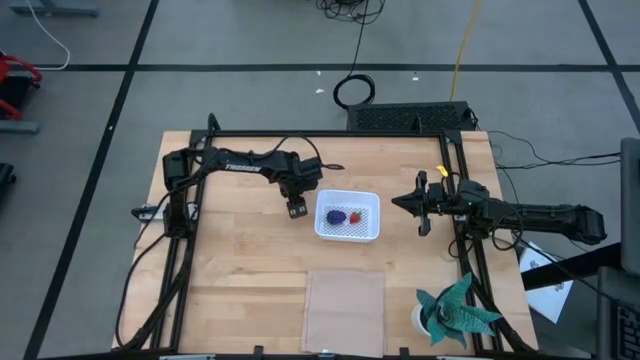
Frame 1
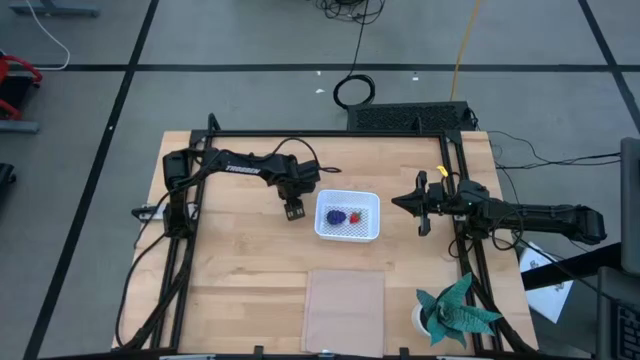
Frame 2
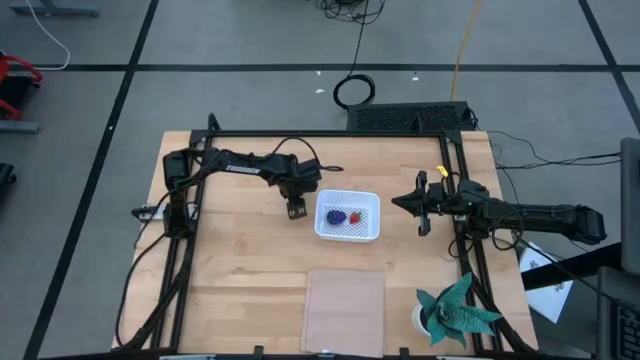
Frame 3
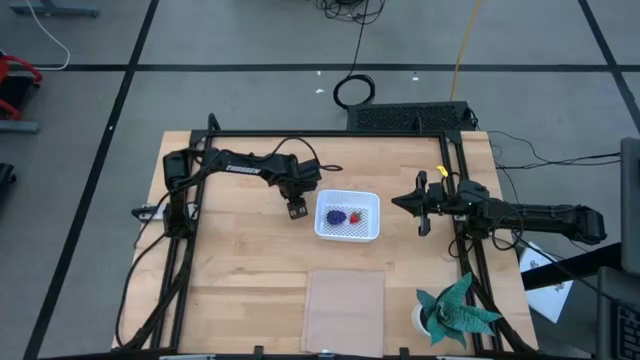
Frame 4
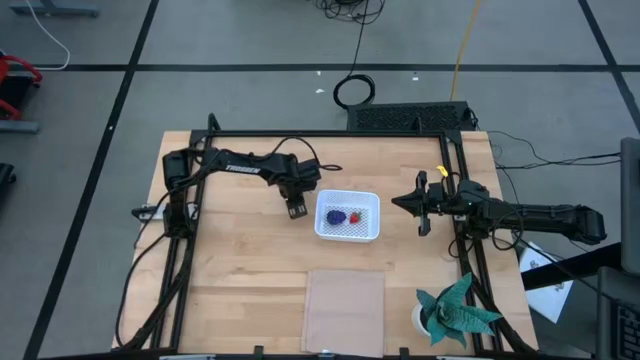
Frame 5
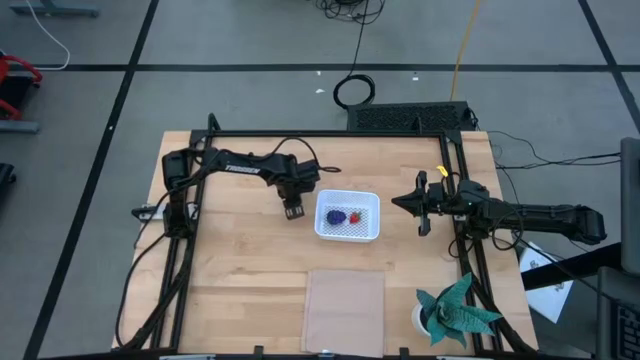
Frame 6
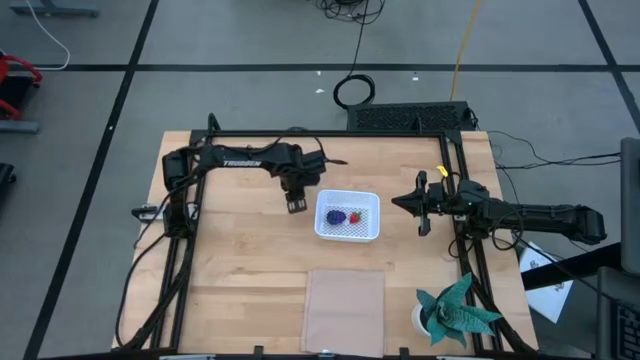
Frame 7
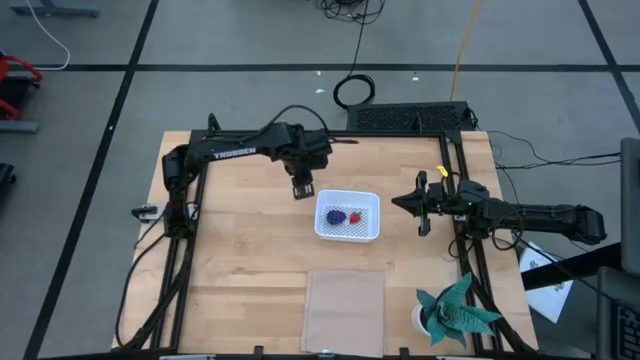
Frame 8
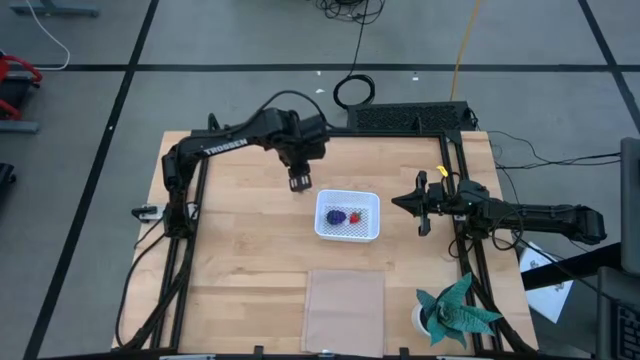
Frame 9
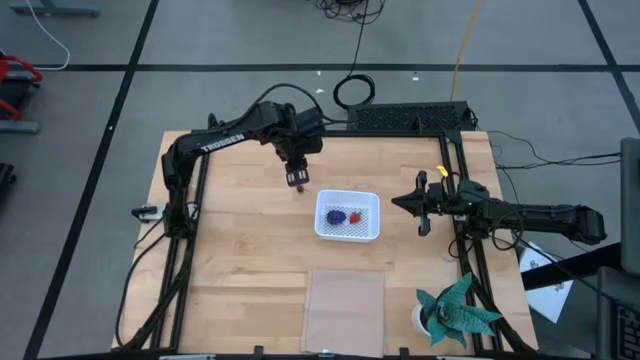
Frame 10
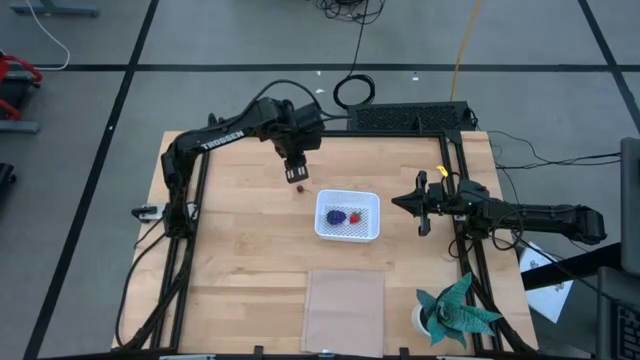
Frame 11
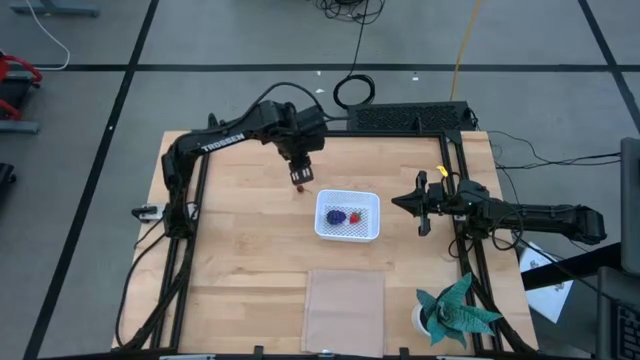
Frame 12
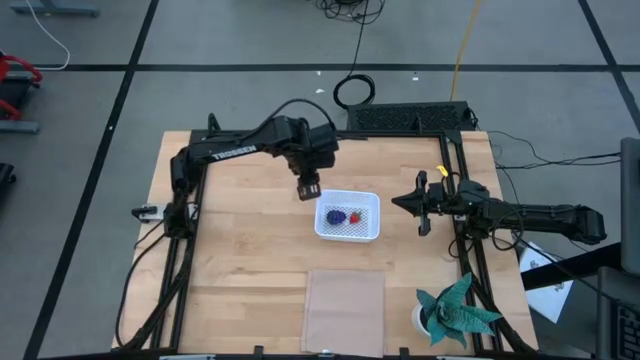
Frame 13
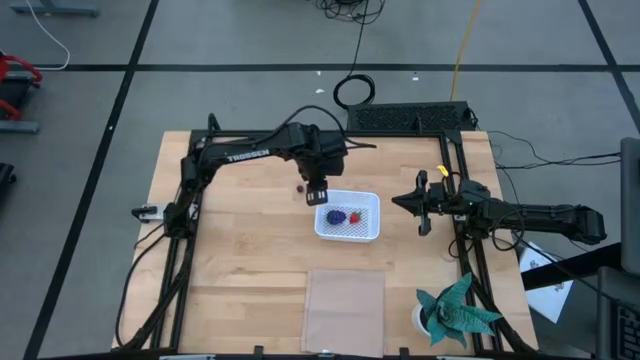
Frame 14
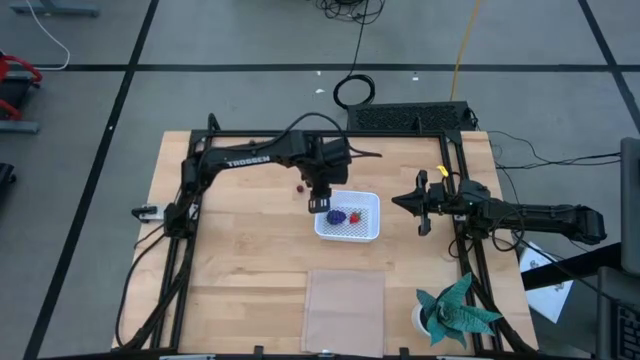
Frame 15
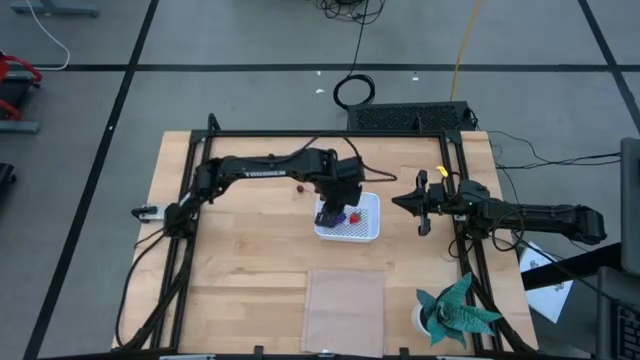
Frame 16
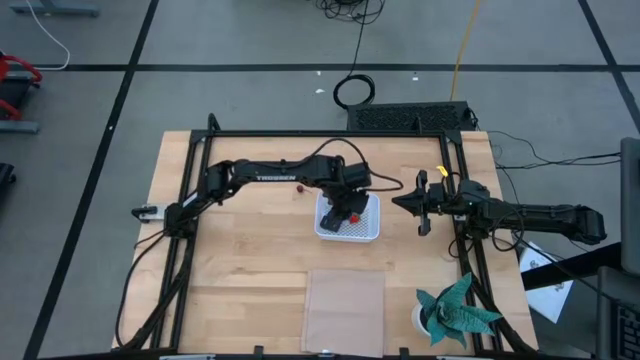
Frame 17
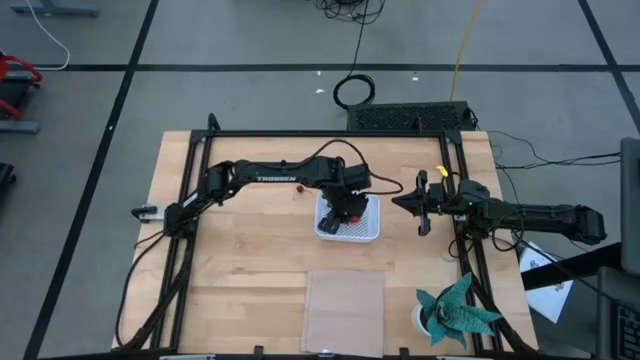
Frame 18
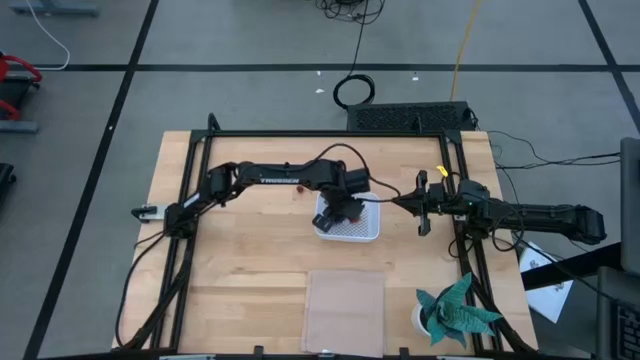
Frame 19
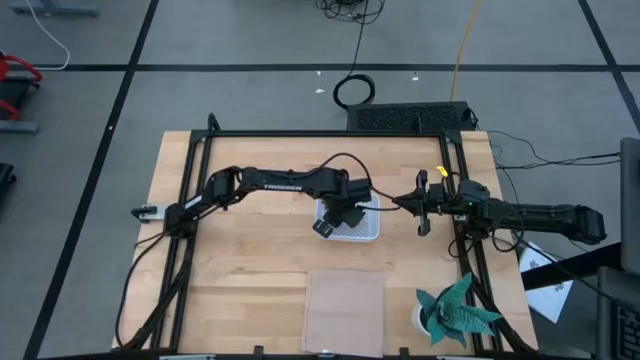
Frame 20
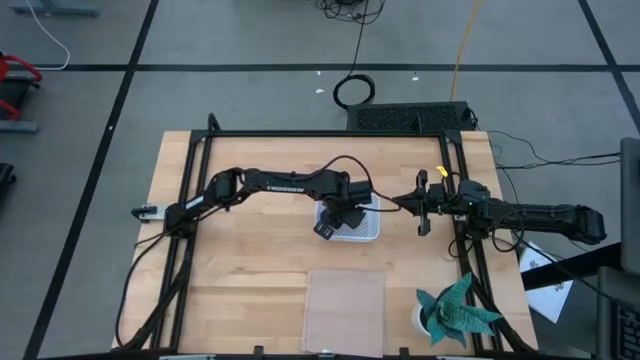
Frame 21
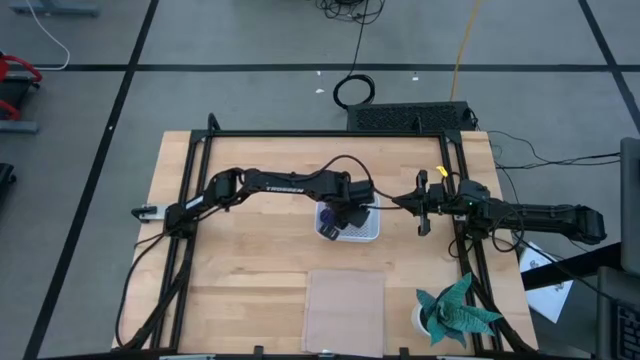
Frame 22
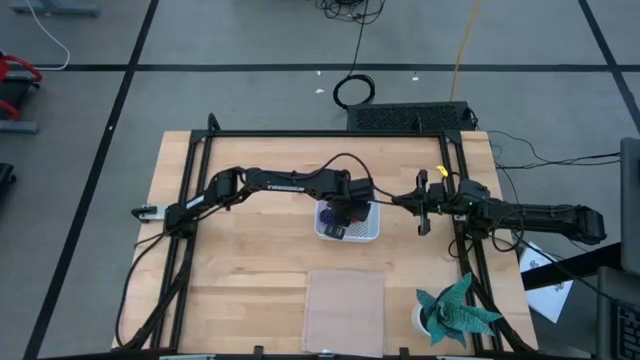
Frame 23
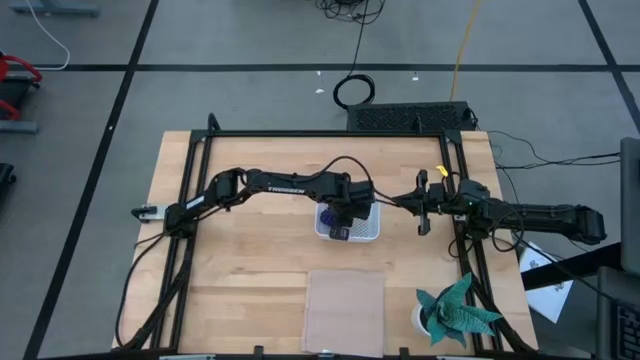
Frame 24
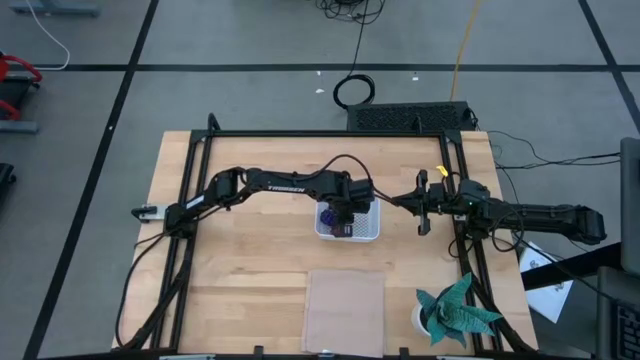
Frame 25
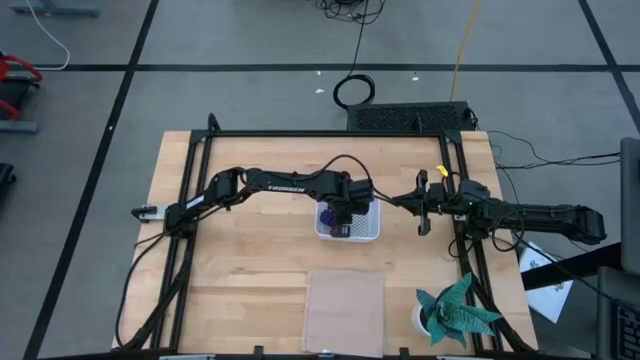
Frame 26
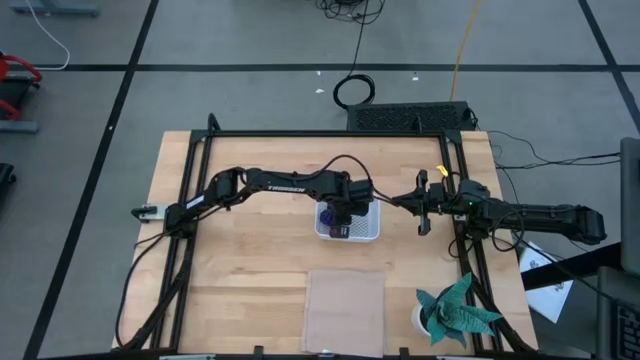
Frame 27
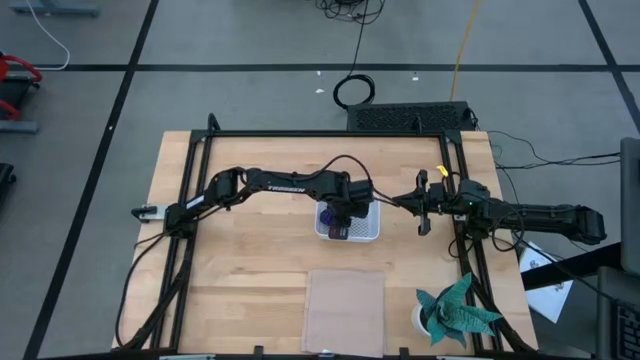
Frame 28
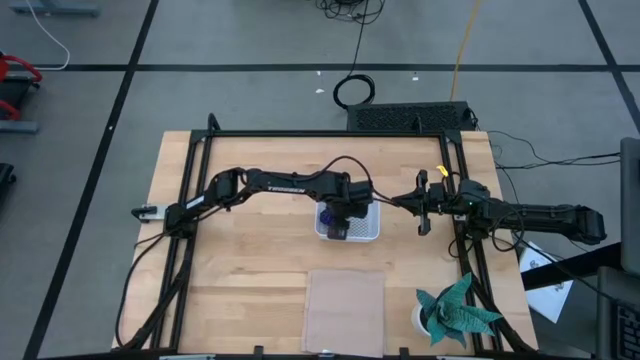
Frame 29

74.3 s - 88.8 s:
Task: Pick and placing Produce into tupperware
Put the black cherry into the white basket

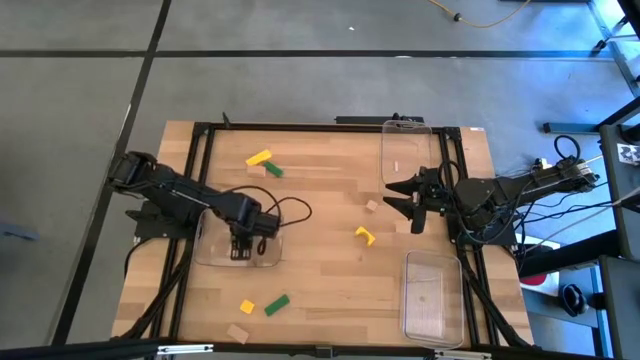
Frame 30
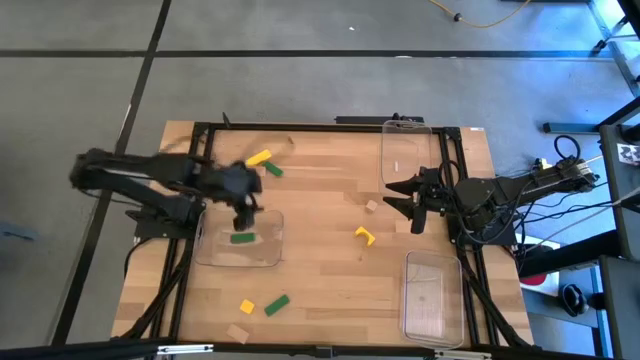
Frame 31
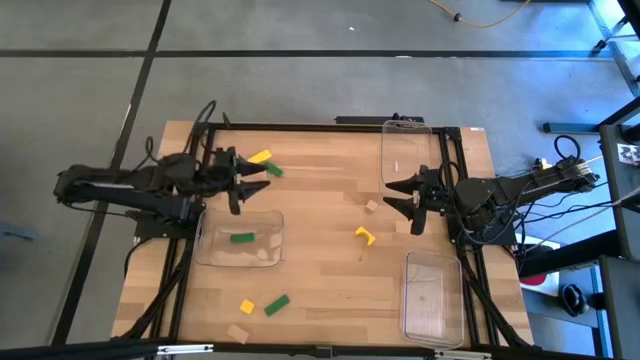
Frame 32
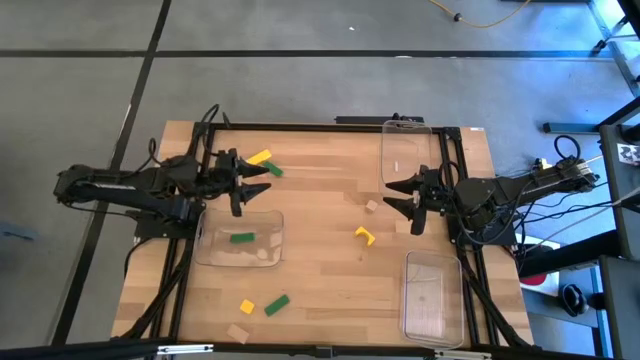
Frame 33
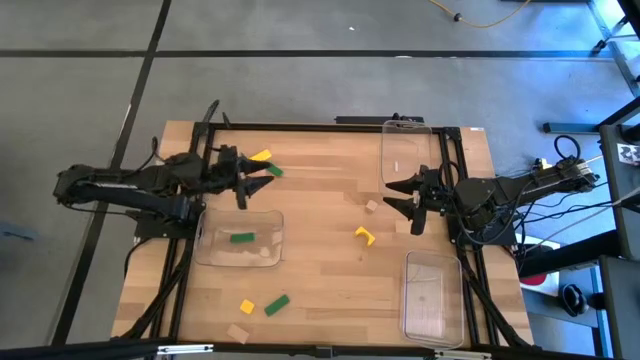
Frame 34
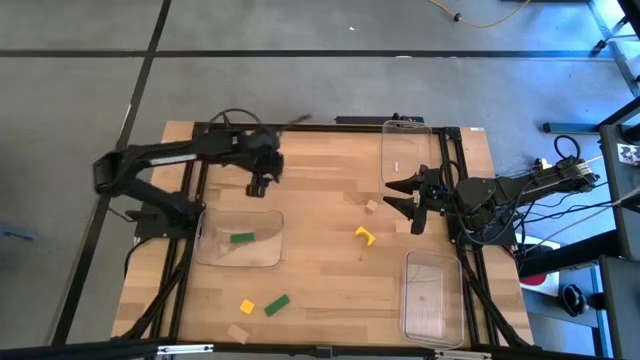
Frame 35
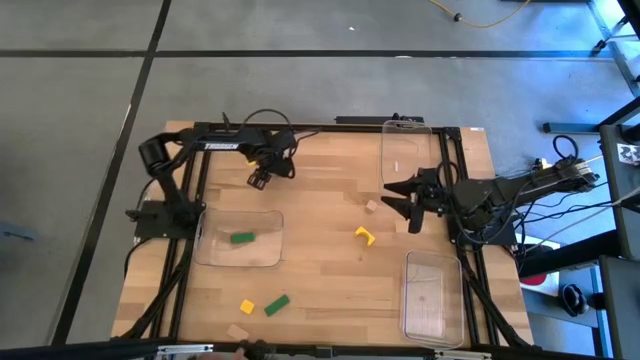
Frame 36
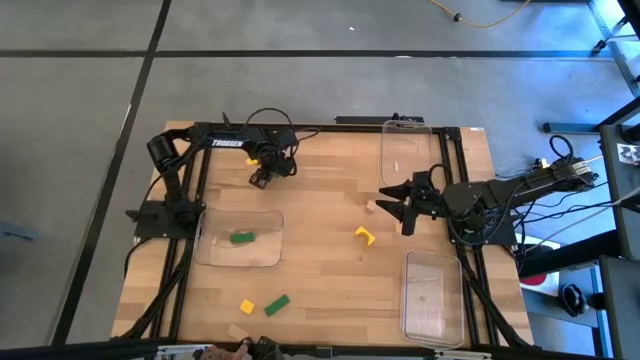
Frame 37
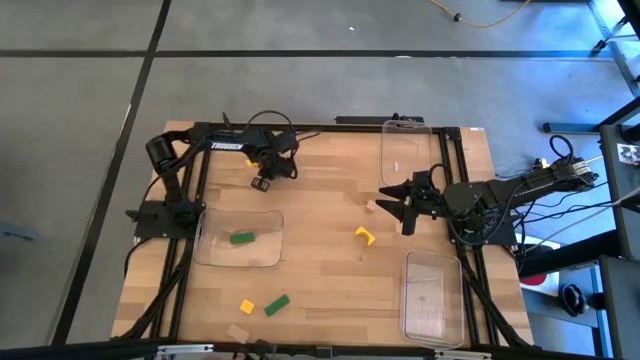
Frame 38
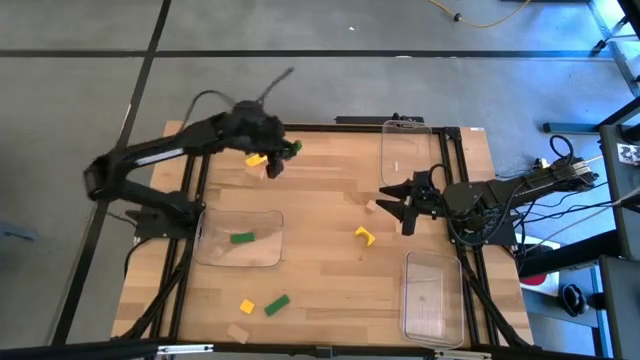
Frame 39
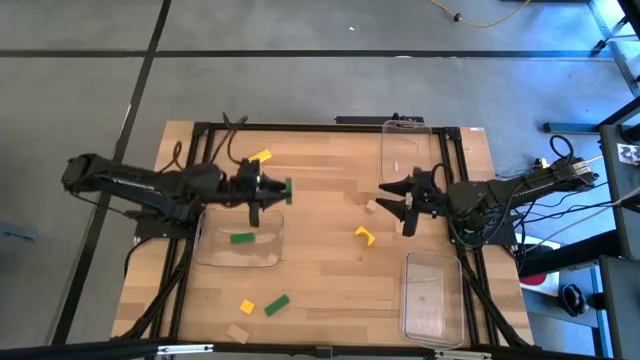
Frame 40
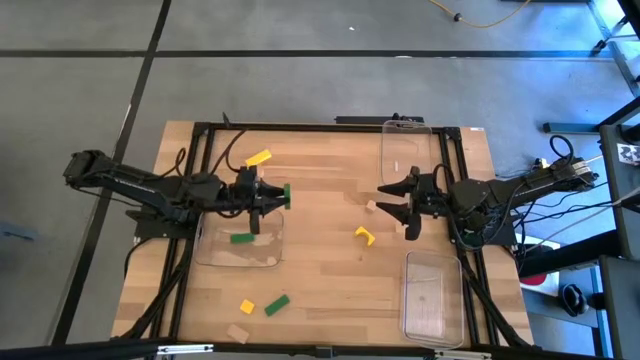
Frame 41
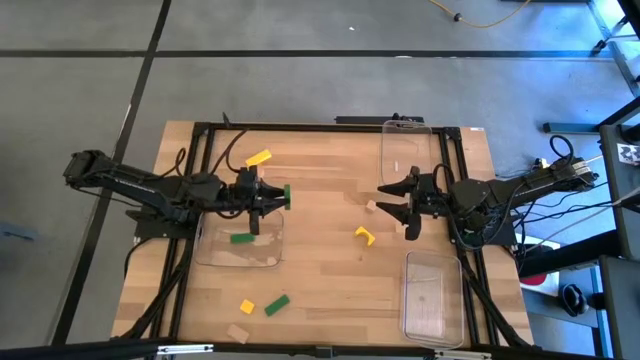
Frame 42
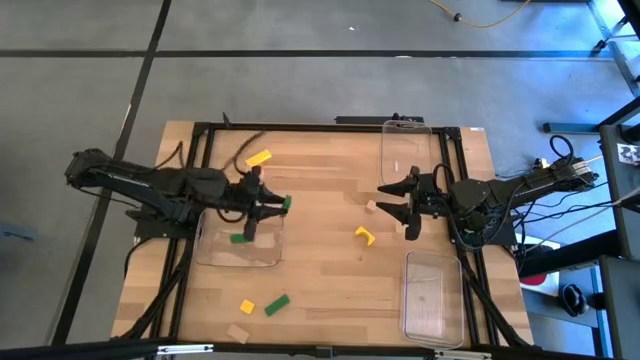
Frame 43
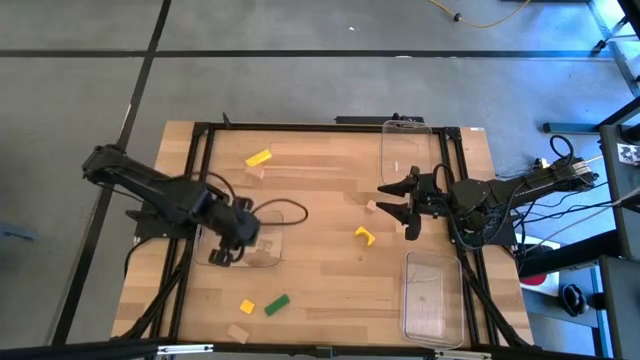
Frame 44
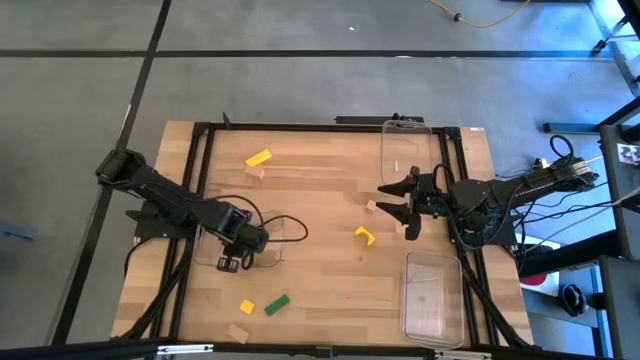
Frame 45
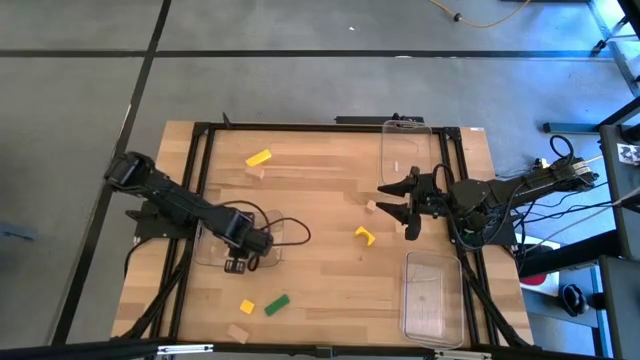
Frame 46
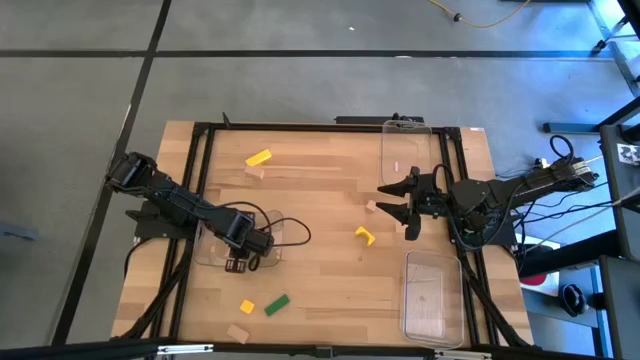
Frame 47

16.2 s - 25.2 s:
Task: Sort & place blocks by color
Put the top green block into the left transparent bin
